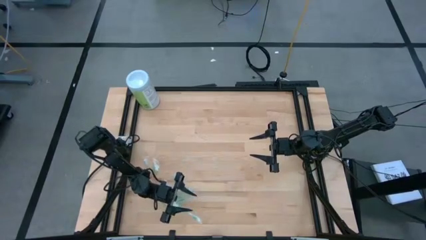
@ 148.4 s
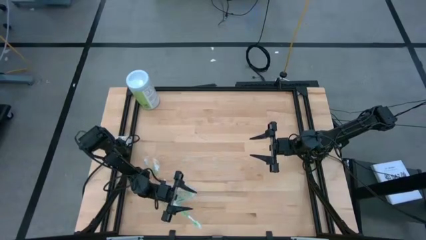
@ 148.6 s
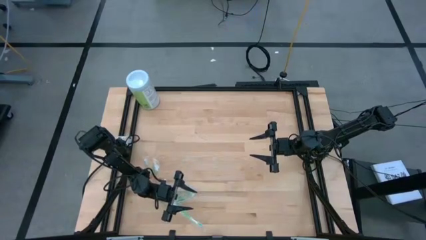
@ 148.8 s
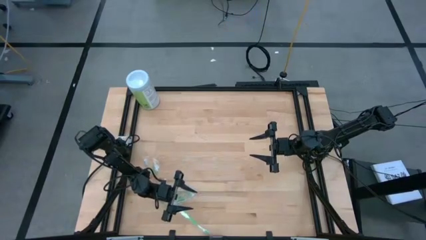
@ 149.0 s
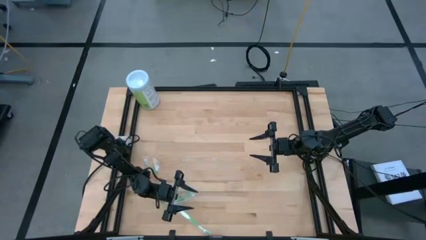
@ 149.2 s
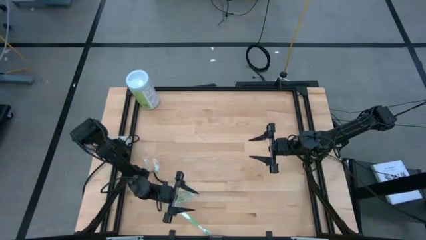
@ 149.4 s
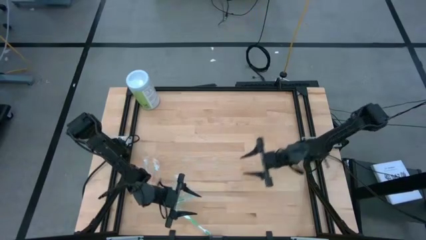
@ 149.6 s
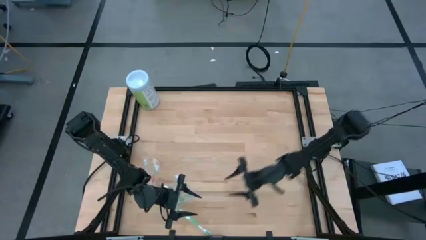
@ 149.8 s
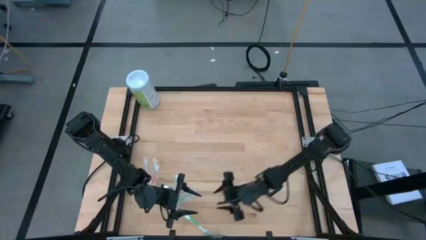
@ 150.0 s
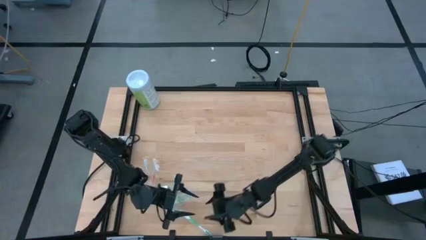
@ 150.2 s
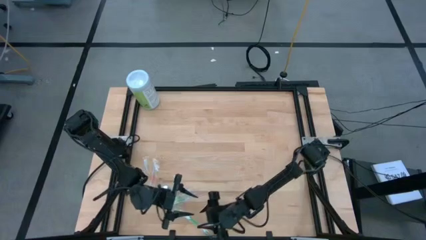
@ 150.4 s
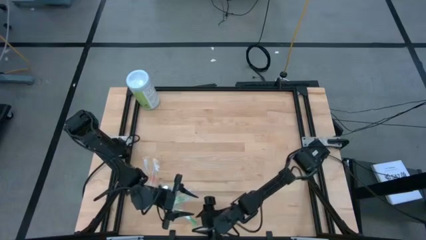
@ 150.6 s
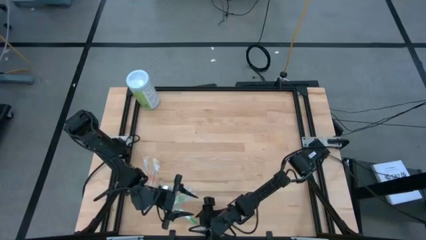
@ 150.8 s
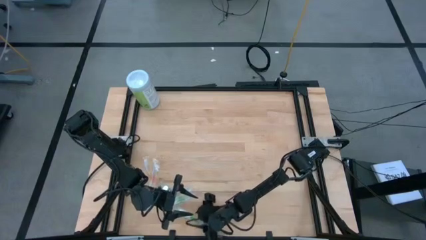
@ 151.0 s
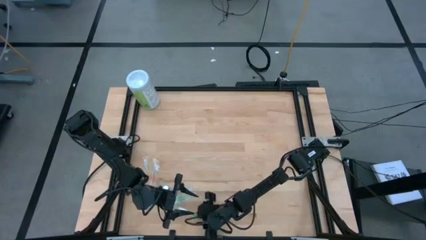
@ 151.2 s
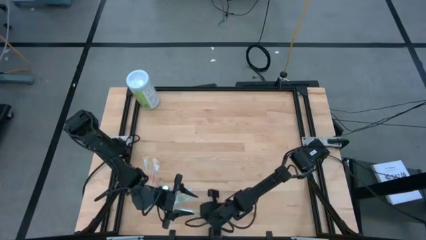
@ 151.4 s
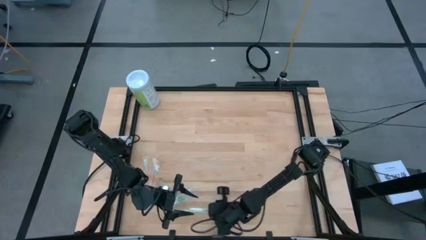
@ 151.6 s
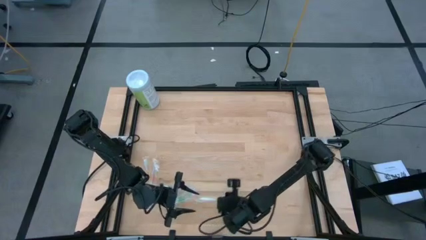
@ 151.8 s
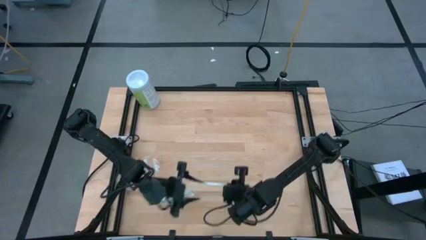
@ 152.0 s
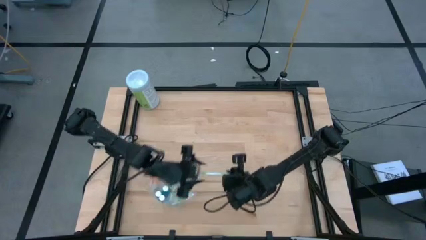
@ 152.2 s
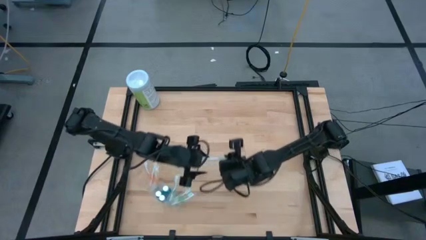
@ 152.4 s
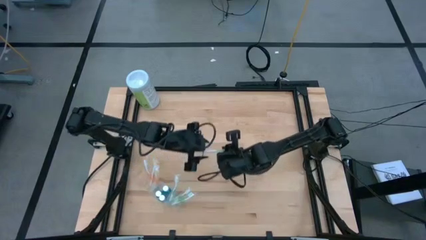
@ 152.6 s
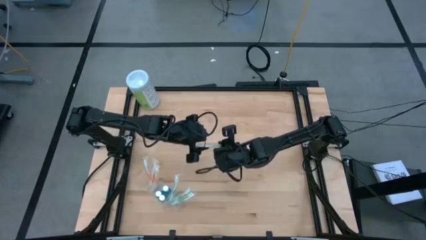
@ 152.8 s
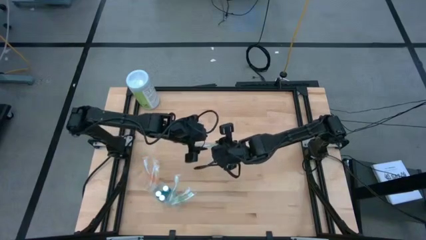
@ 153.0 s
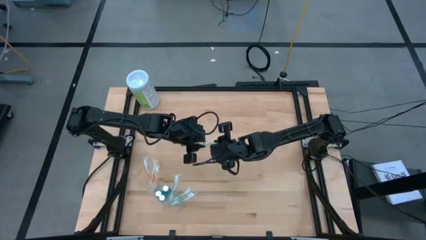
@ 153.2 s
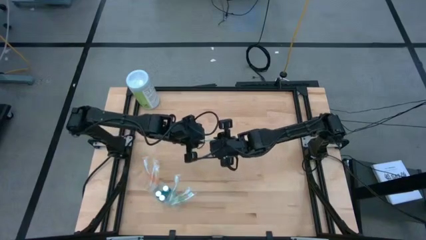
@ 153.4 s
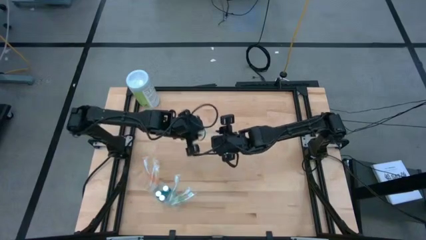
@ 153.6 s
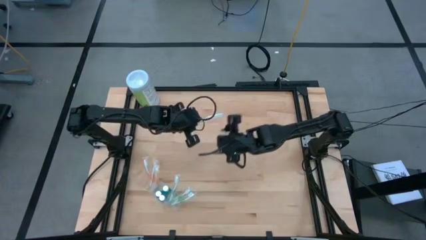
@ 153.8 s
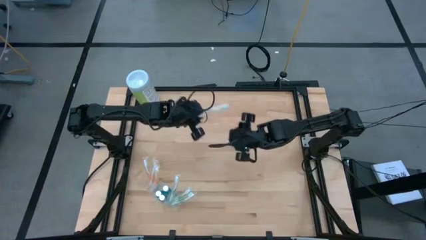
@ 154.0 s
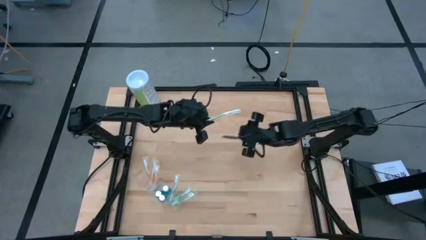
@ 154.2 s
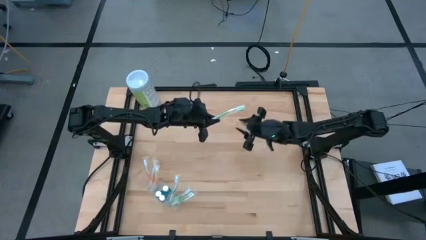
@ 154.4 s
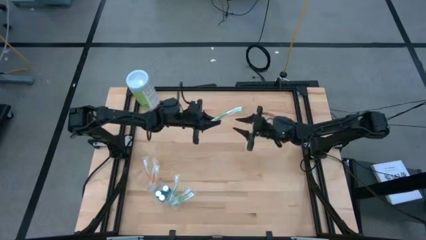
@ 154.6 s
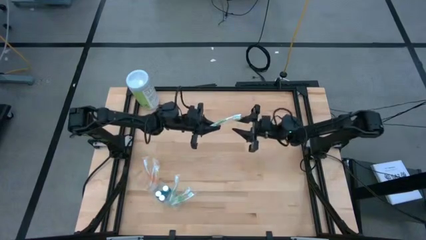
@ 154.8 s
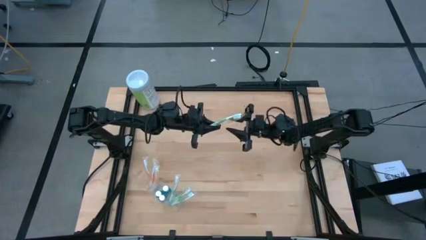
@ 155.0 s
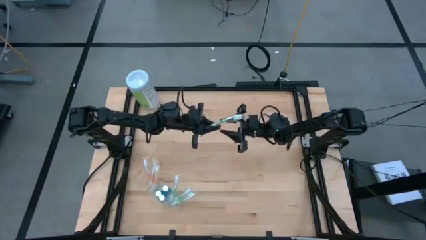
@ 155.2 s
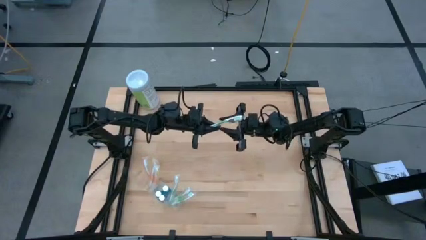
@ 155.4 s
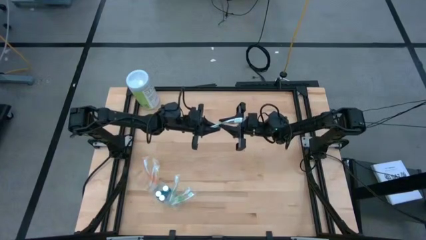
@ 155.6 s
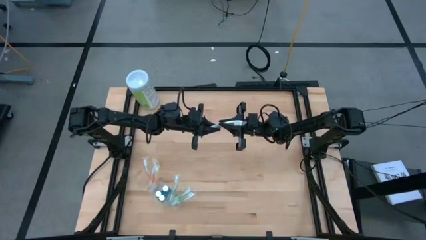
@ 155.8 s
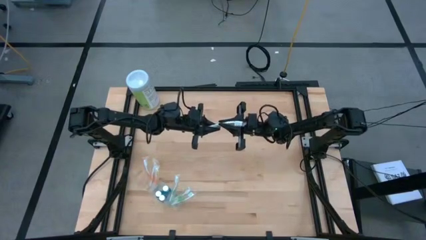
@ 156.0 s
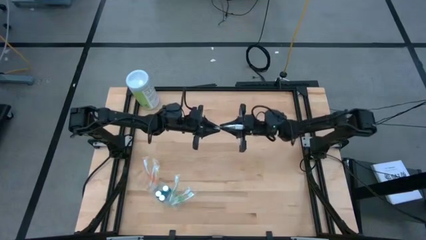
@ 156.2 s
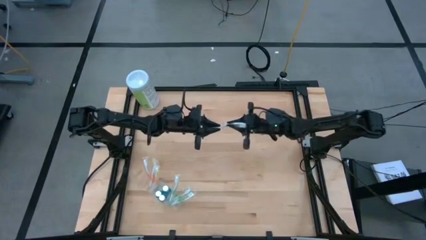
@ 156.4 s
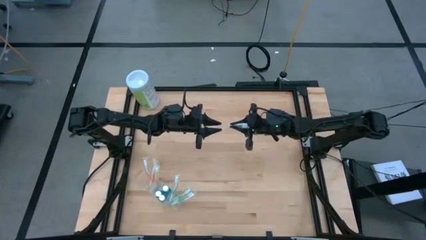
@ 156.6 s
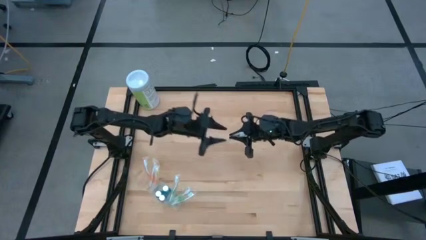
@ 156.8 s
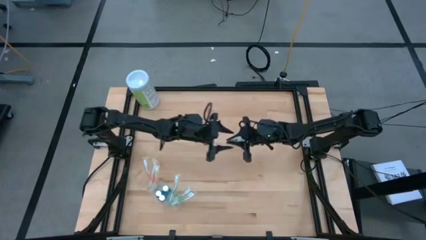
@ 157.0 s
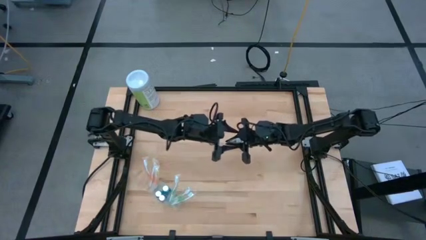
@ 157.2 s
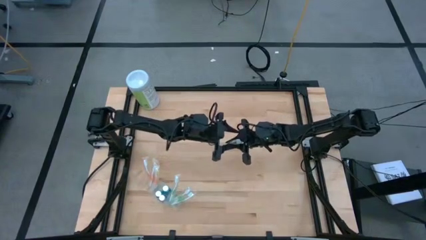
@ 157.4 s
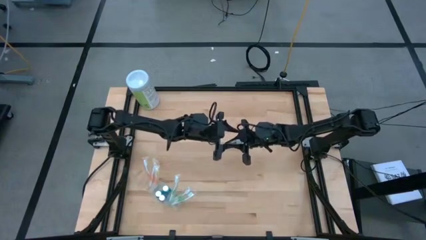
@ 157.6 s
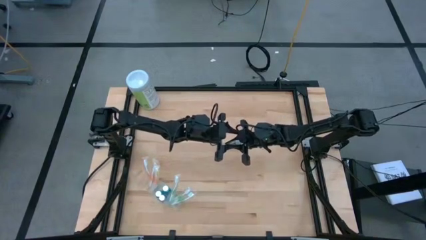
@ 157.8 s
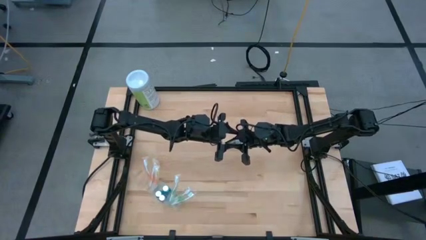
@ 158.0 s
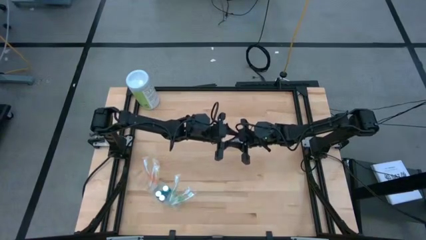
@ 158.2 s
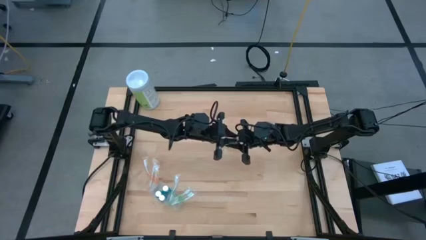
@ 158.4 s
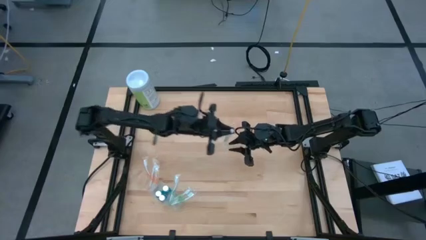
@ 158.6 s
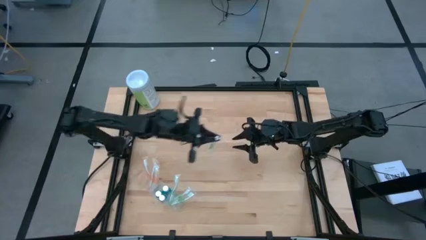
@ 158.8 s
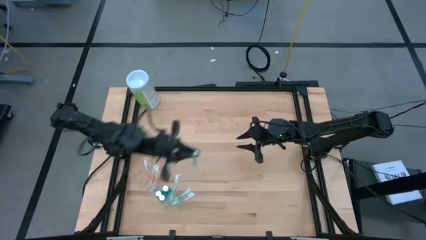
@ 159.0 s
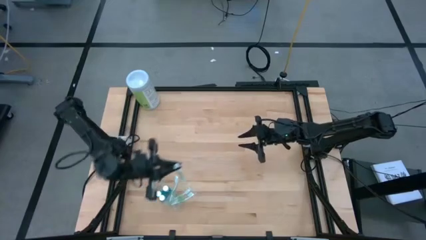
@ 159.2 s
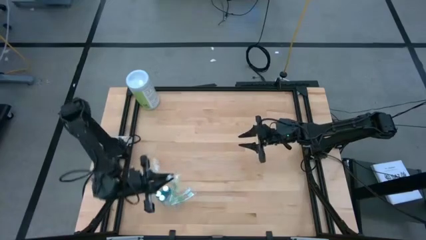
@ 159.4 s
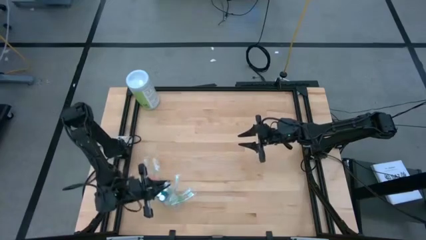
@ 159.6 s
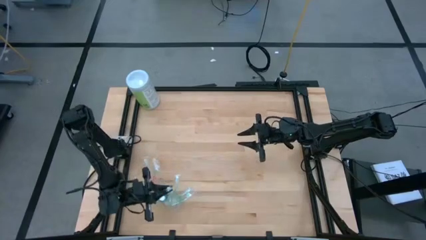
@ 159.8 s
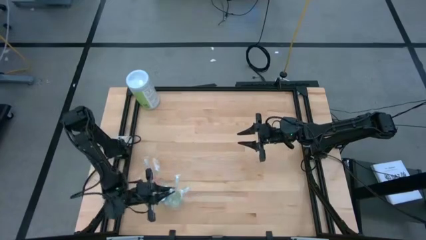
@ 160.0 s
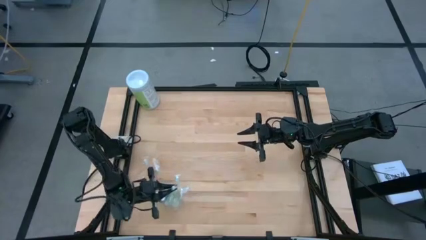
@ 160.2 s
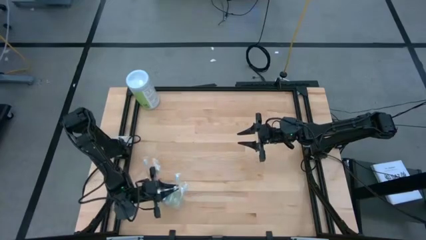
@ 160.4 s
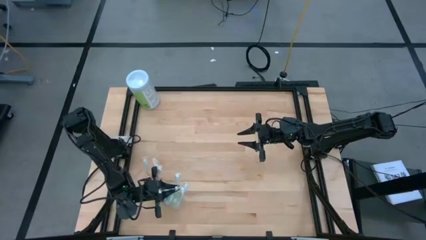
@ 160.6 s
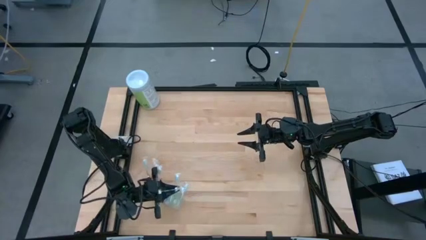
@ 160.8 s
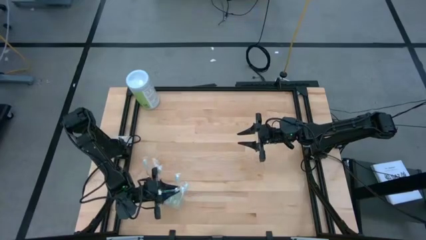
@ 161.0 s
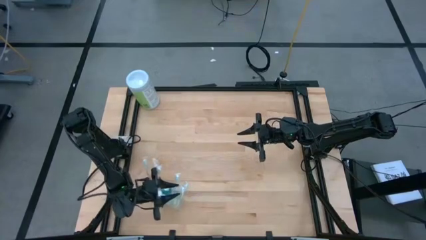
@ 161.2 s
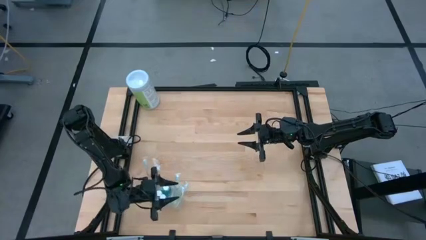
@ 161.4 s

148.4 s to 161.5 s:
Task: Pick & Place toothbrushing station
Put the green toothbrush into the transparent organizer
